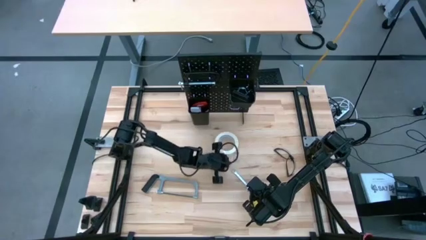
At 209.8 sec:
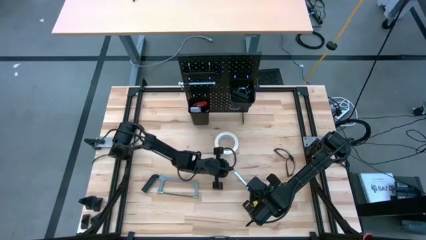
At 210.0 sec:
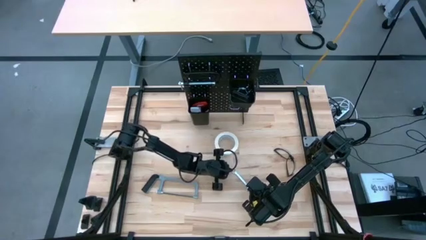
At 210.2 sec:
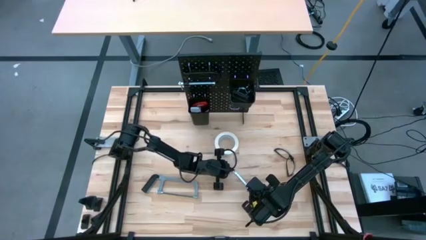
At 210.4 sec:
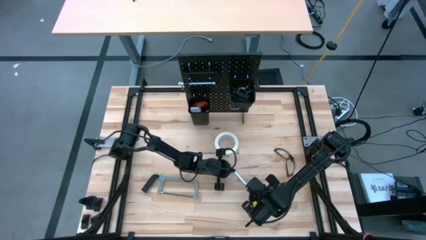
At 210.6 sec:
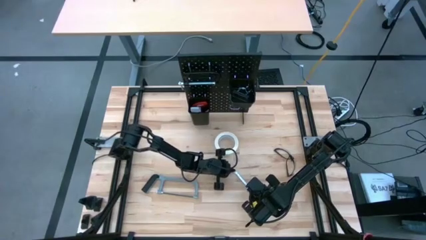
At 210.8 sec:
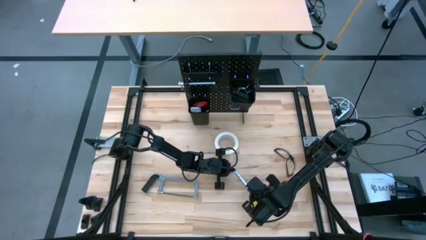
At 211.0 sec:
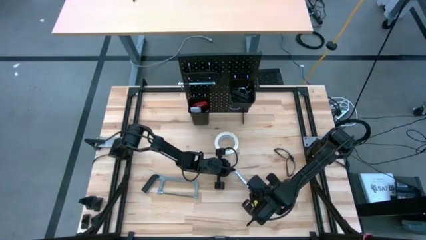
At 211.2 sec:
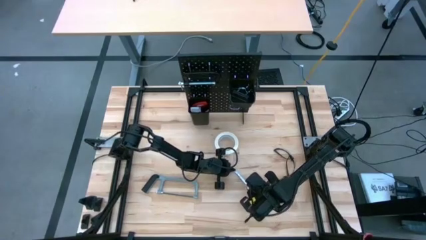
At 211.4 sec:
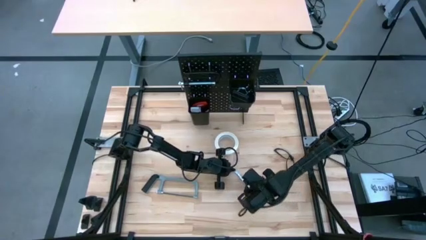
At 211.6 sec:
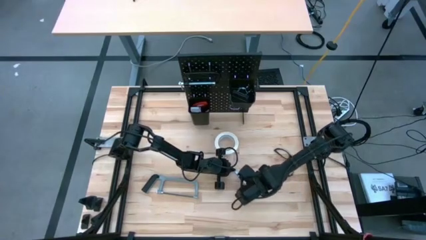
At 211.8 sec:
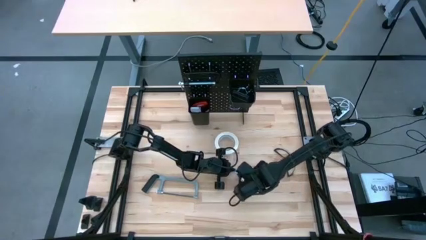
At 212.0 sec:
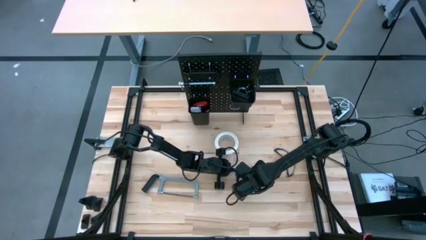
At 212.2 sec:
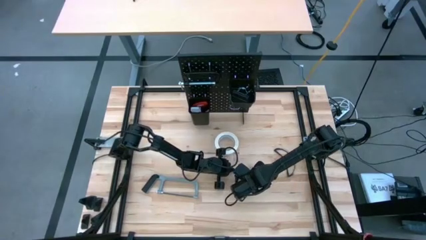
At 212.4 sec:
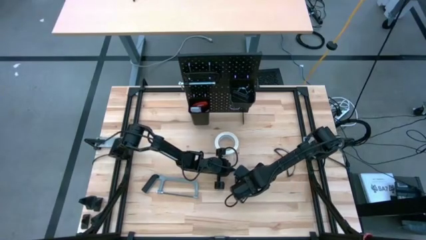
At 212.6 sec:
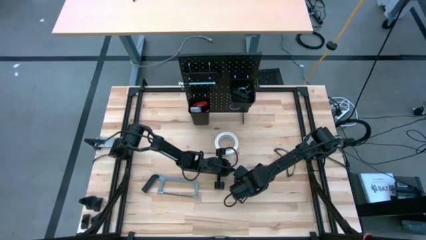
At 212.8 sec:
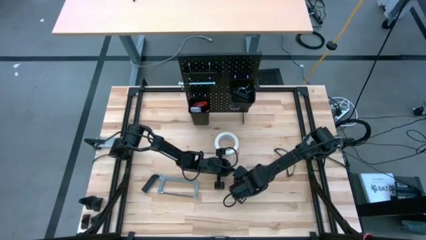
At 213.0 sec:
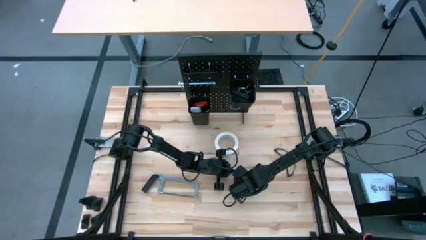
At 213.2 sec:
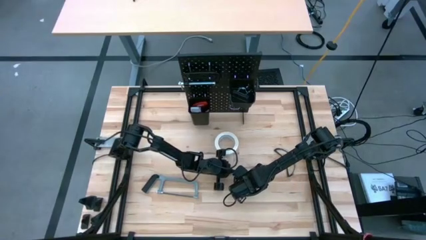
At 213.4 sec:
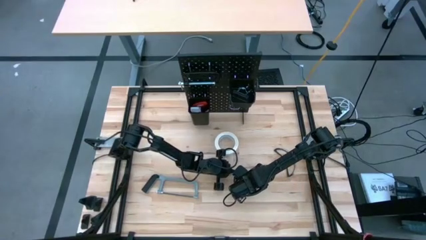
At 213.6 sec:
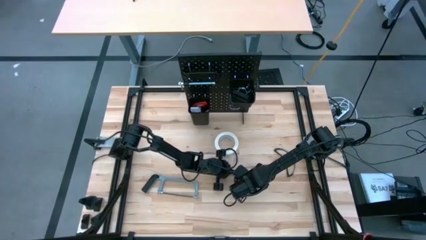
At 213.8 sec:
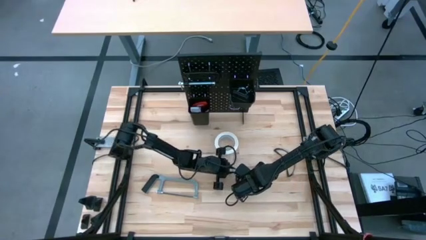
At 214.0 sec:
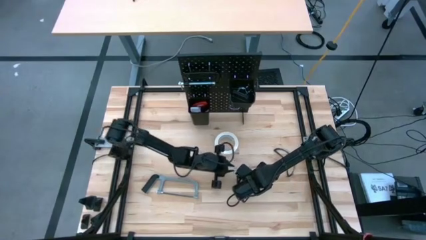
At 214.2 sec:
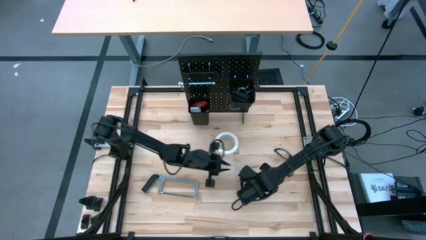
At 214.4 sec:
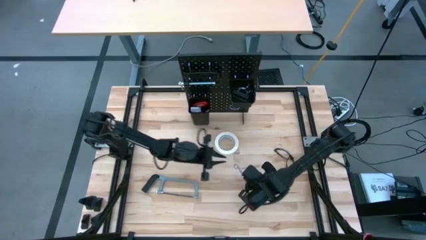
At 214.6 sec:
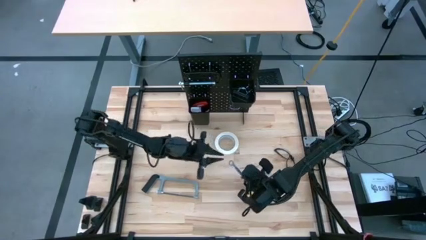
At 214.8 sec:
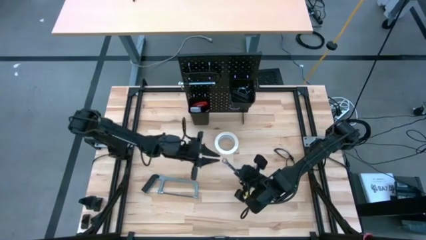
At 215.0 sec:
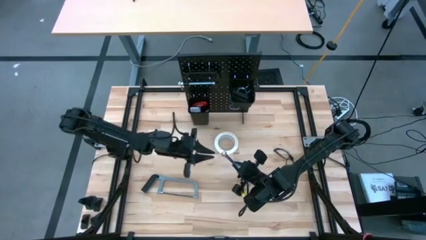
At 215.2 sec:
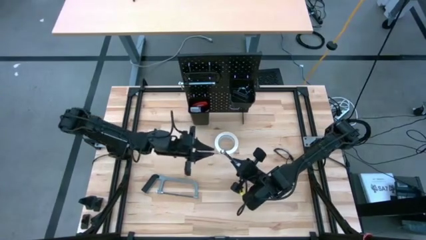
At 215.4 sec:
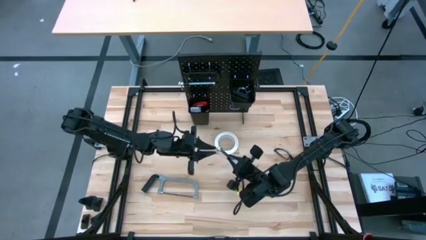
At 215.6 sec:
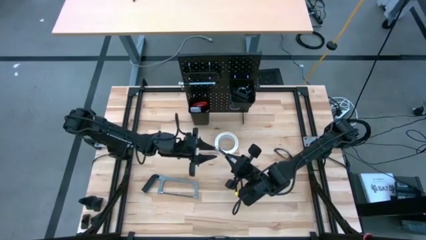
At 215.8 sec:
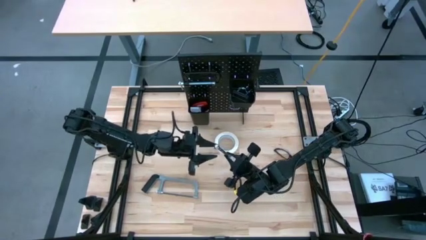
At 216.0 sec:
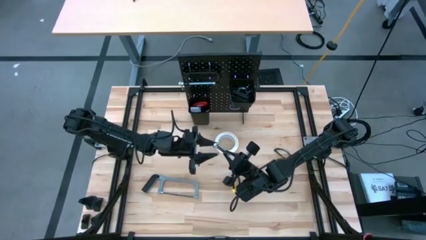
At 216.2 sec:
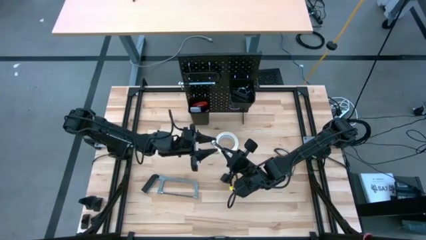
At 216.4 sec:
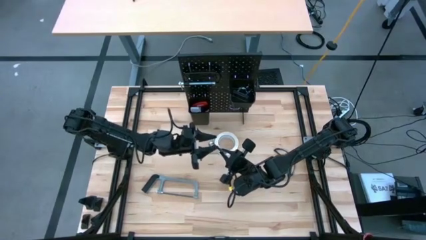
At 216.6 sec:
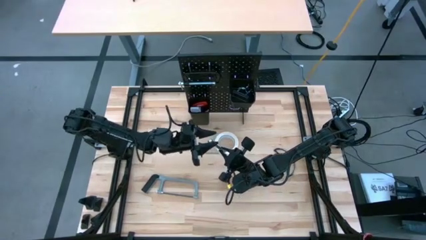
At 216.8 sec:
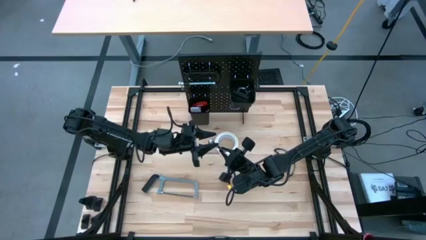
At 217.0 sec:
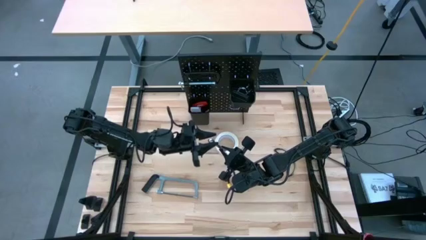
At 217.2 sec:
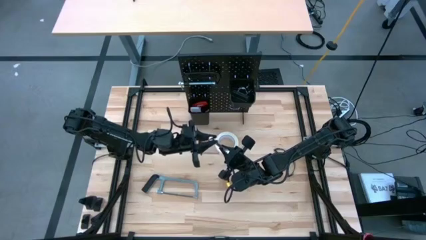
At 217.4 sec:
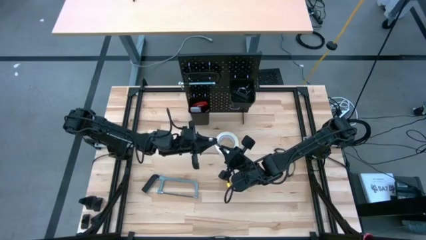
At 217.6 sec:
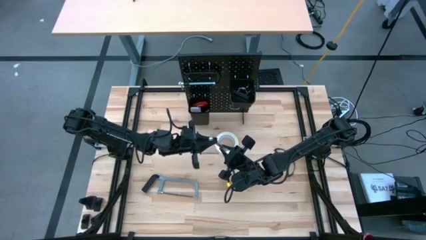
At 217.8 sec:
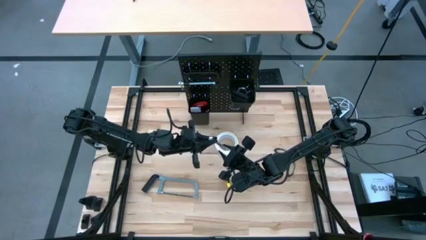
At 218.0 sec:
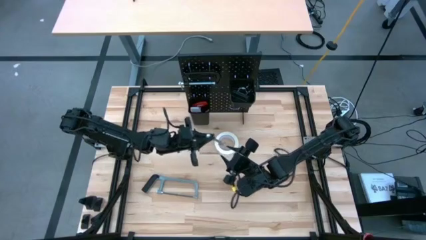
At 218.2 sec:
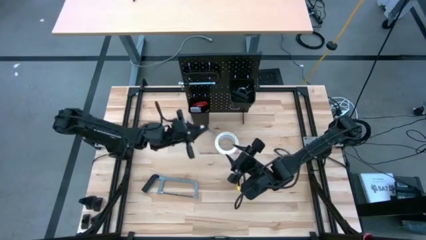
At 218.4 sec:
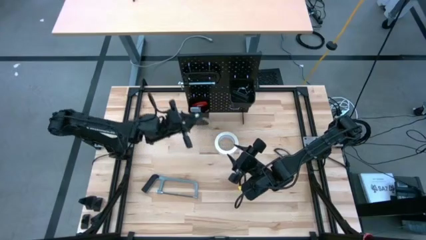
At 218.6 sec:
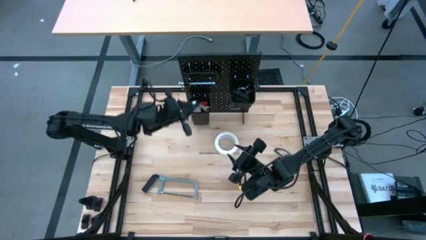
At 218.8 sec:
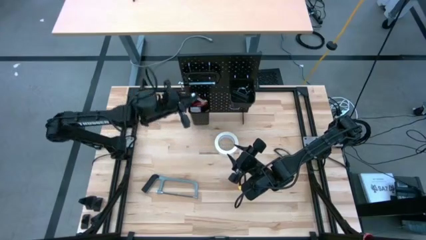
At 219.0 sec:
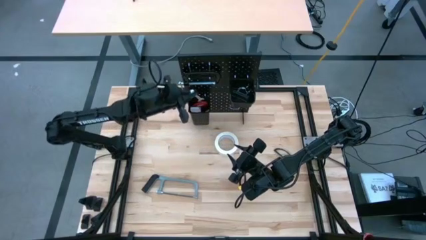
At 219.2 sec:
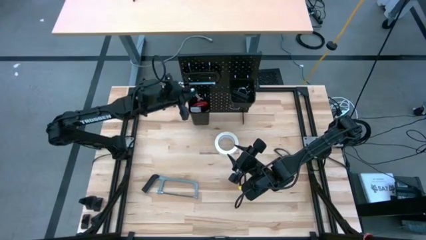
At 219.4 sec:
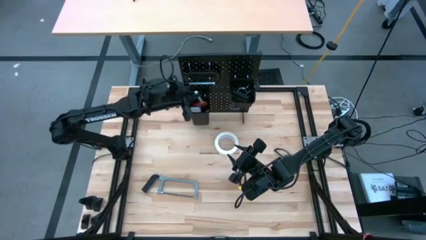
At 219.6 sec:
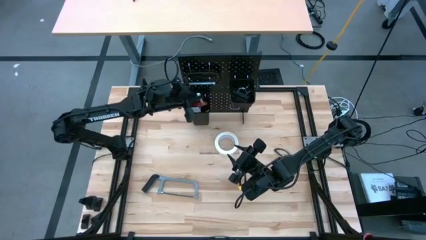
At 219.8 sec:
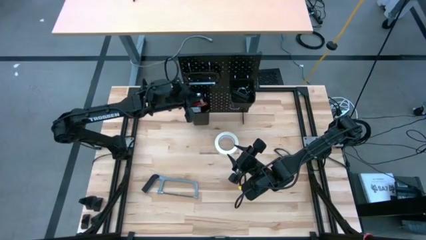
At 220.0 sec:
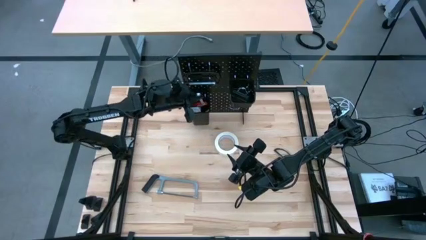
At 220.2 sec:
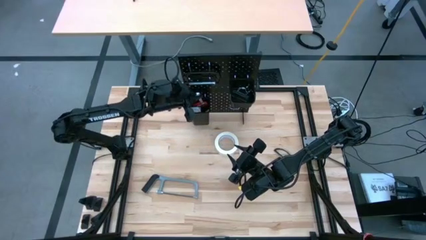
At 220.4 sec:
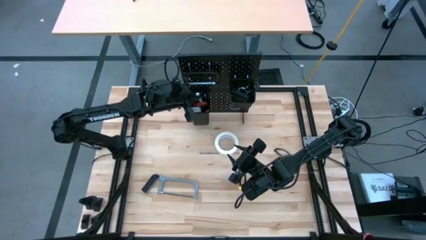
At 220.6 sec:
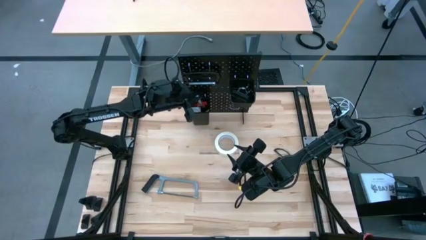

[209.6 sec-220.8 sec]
Task: Hang tools onto peg board
Put the silver wrench into the left black tool bin

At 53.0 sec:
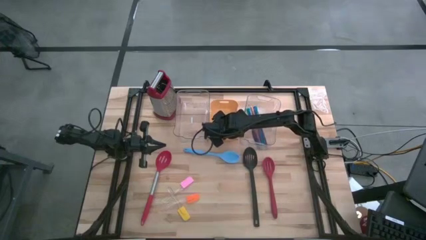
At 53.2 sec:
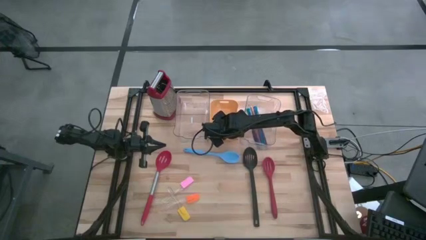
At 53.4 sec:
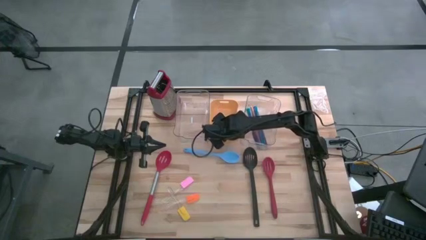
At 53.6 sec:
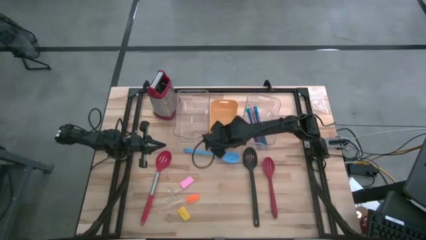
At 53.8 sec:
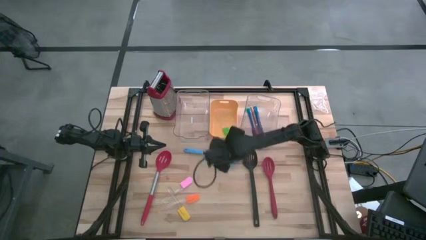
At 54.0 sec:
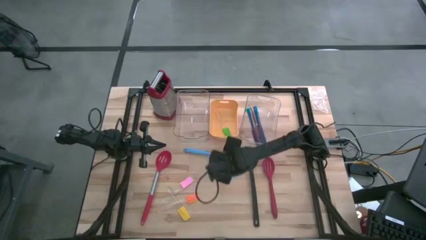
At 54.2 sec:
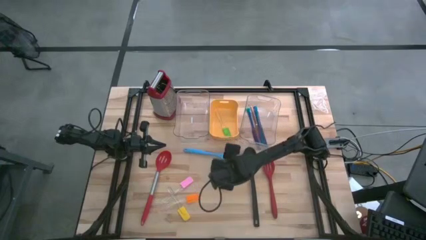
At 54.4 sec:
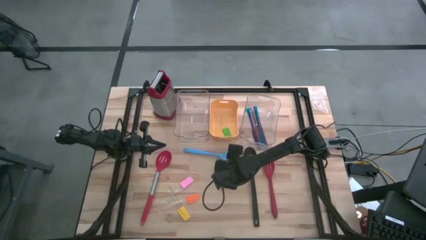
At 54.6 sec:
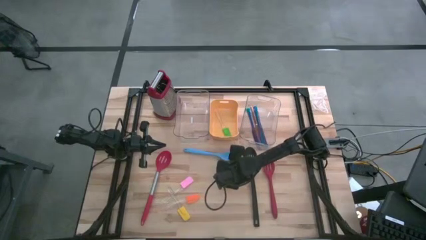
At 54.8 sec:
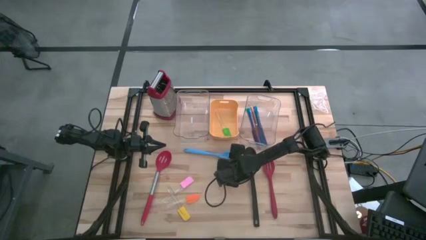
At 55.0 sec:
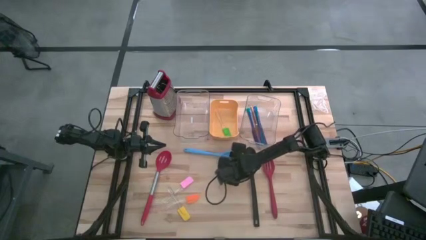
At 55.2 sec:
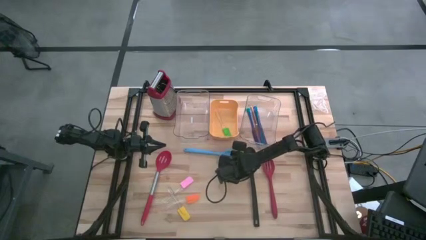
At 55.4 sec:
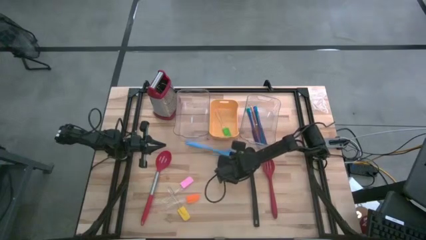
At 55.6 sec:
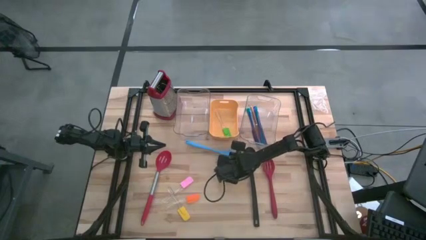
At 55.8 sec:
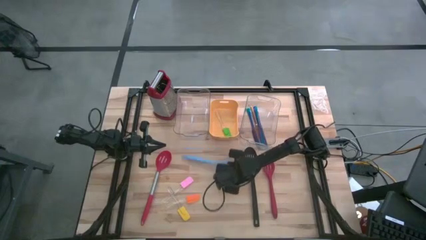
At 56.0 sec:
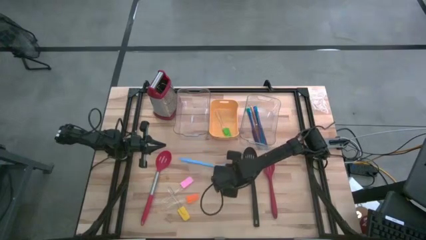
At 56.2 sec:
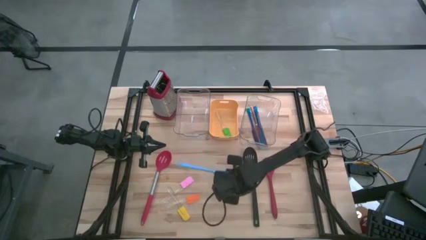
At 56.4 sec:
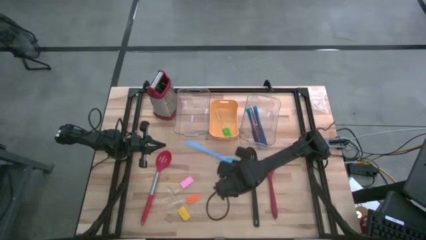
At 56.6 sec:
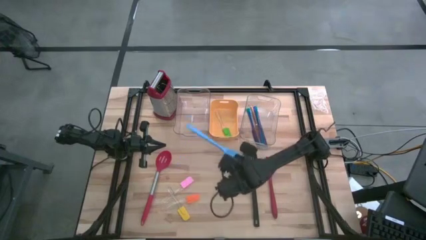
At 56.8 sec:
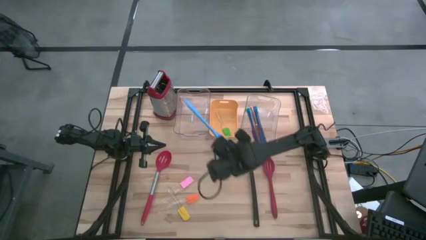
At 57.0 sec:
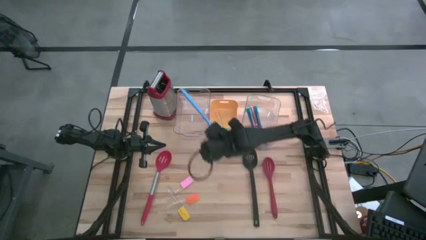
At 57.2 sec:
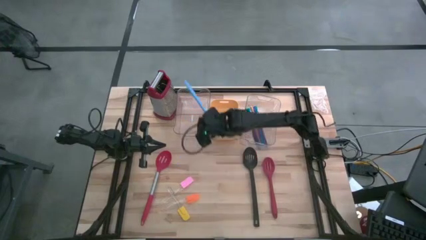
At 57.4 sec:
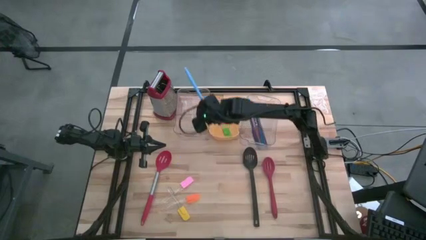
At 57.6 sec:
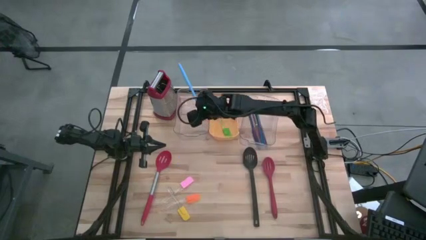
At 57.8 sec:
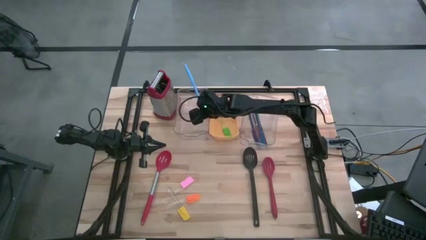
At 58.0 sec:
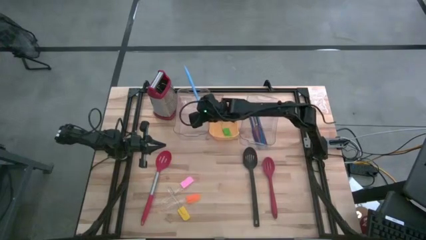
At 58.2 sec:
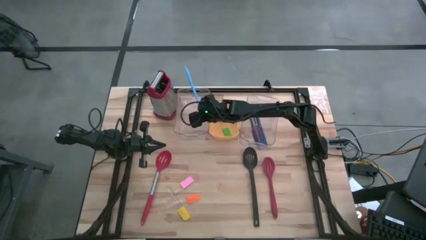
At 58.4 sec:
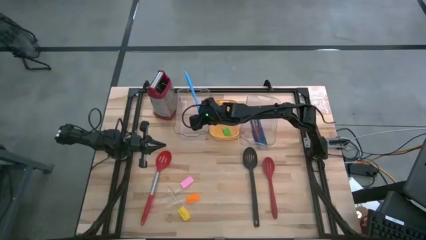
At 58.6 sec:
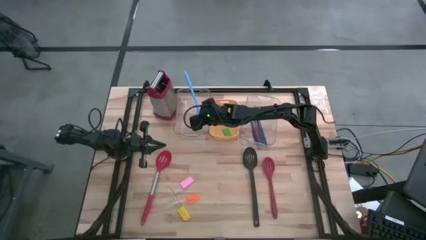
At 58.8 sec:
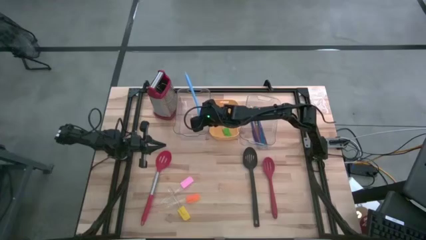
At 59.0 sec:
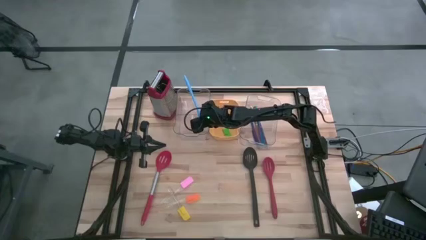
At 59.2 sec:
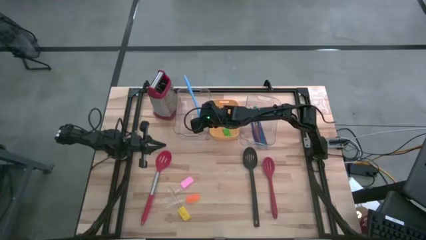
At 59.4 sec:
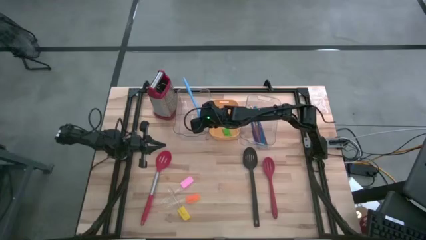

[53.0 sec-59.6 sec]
Task: Pick & Place Kitchen Items
Put the blue spoon into the left transparent bin
